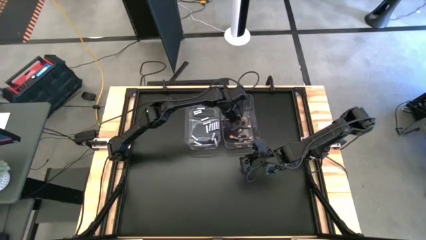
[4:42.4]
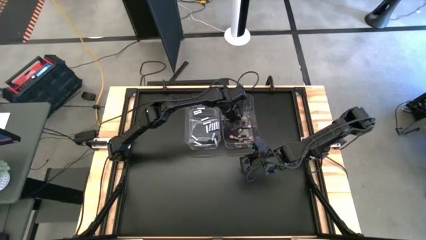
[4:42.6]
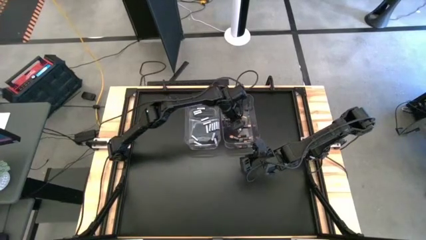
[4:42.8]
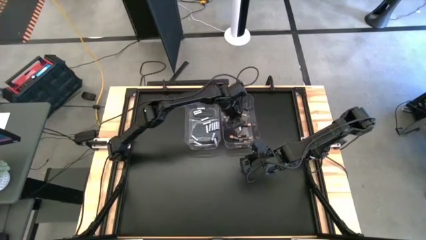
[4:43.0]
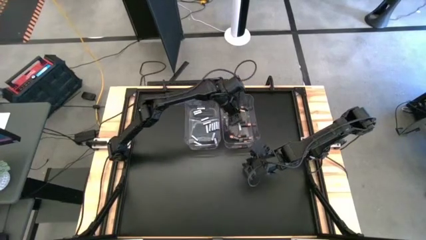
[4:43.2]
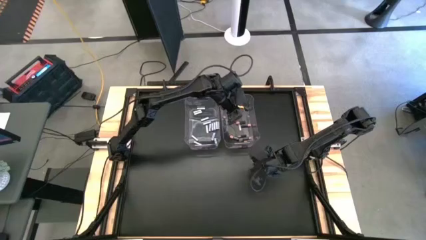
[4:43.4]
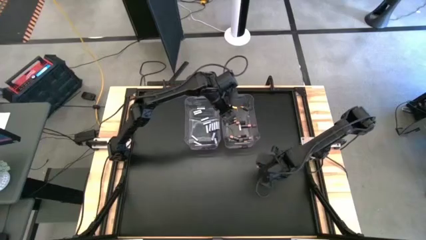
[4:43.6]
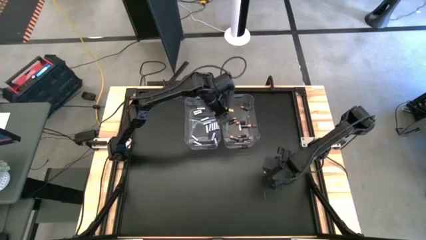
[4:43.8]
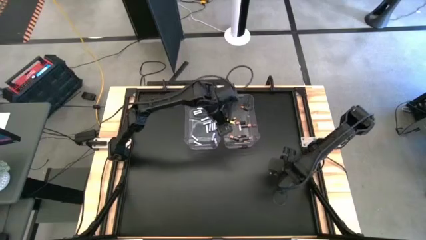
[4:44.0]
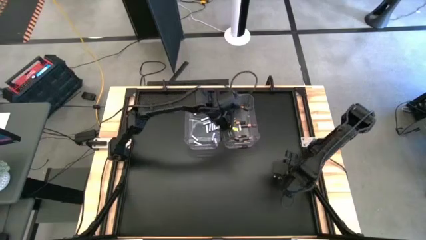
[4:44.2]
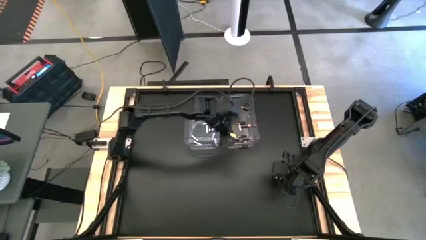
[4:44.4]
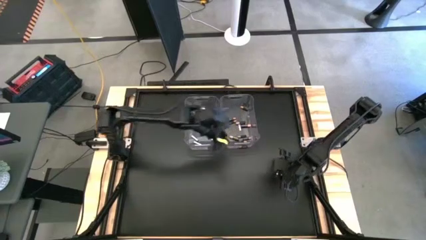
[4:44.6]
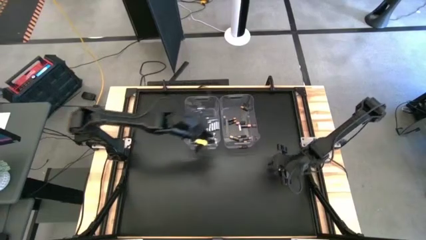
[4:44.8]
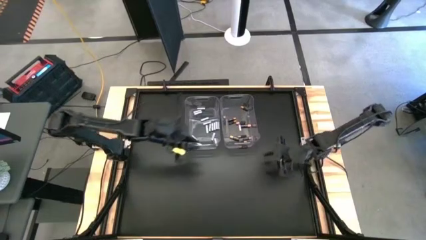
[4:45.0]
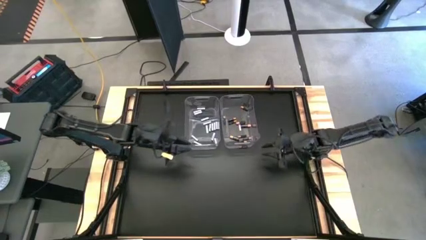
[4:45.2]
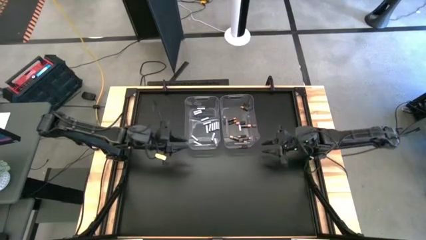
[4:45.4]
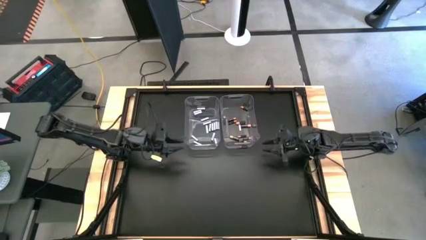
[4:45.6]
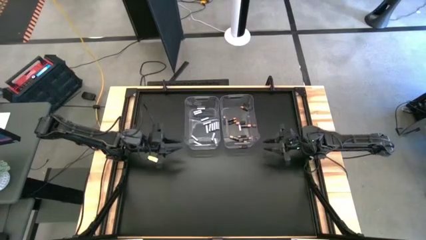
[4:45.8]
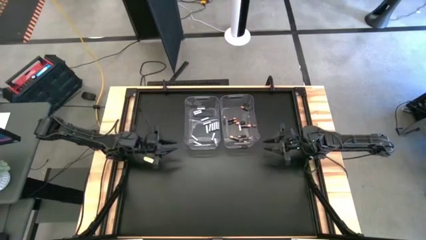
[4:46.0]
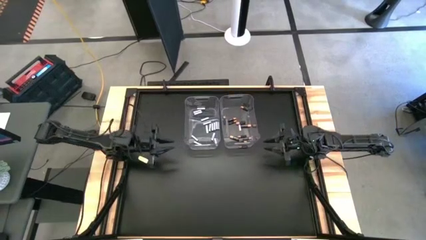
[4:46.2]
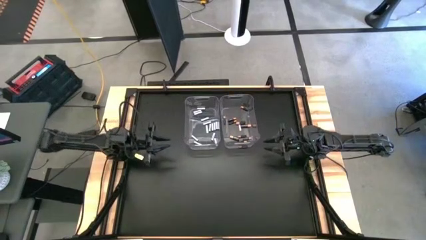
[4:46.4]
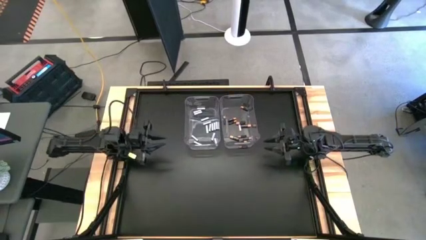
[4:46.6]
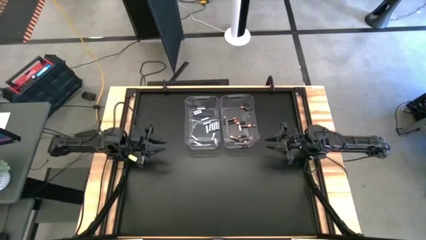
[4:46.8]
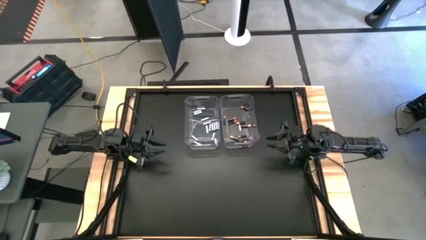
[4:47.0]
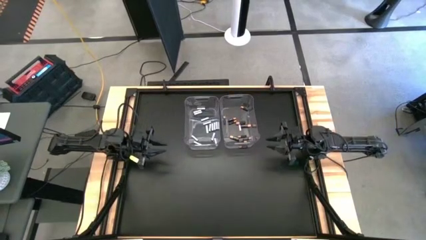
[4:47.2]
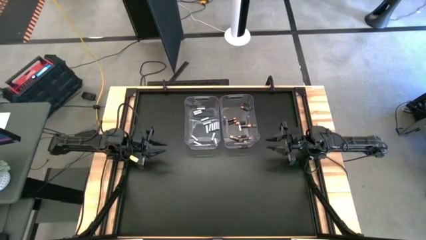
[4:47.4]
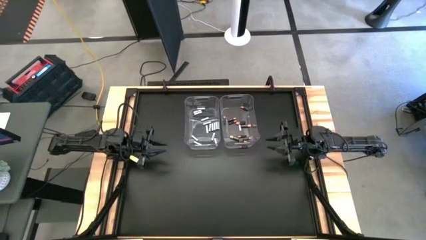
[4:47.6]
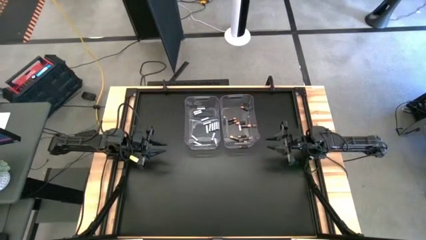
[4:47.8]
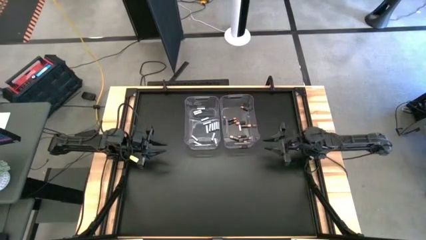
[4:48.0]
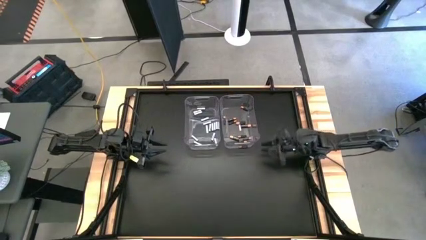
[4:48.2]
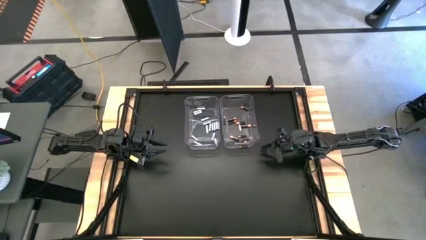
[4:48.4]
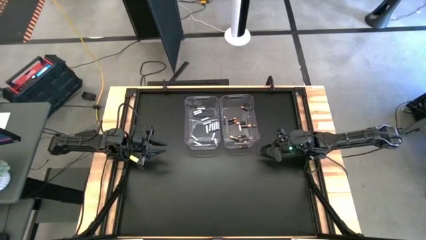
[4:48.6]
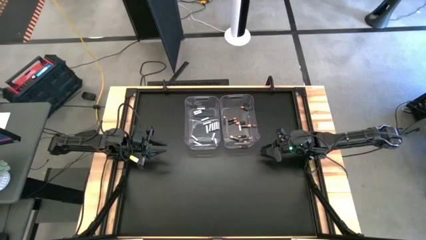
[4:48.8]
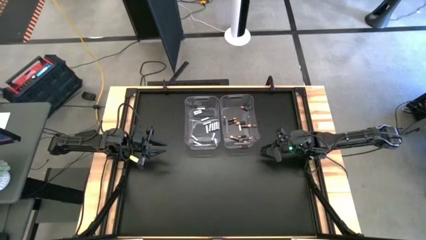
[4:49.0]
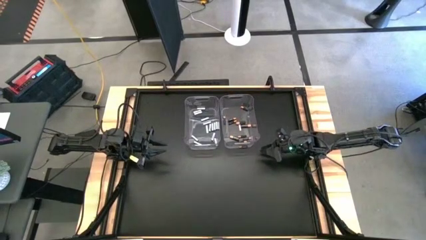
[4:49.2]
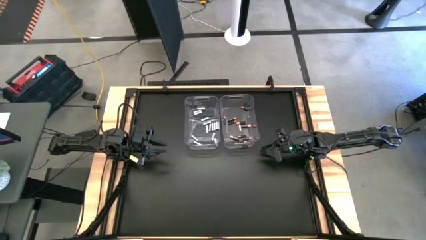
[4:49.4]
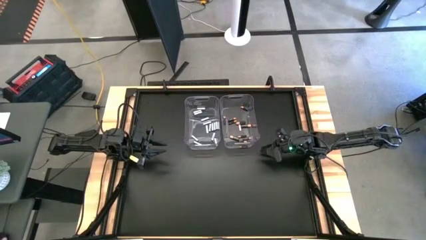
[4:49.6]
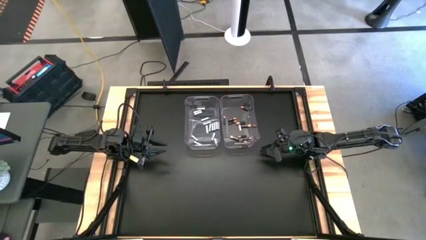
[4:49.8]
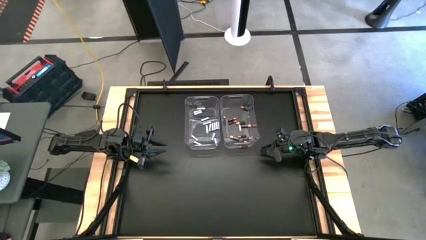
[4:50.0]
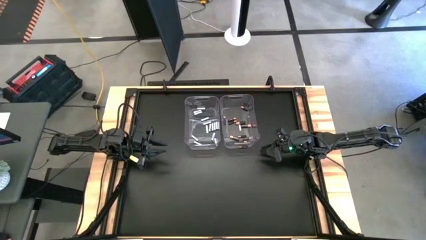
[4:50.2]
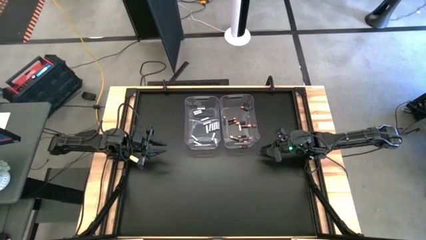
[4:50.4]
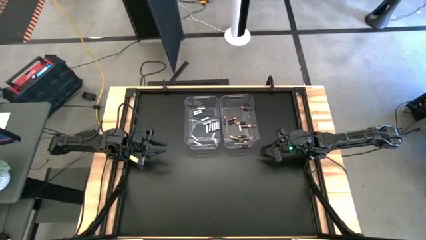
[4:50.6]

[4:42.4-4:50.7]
Task: Sort batteries
Return to Home Position

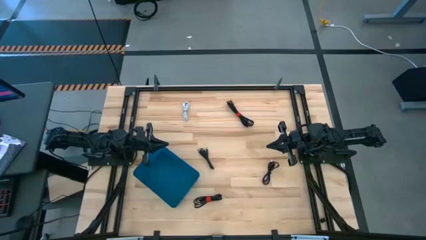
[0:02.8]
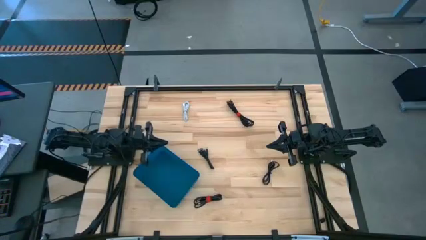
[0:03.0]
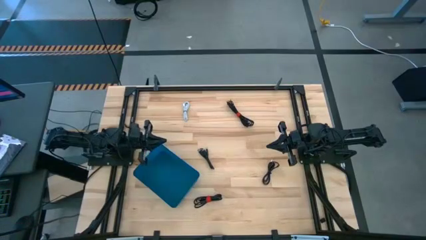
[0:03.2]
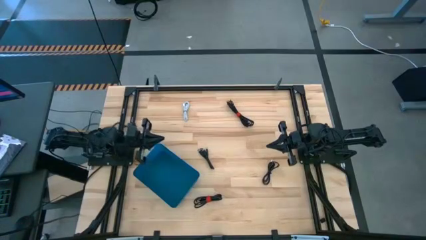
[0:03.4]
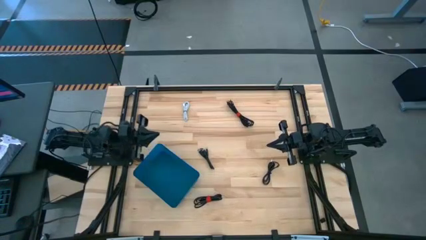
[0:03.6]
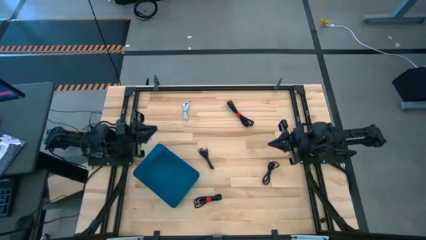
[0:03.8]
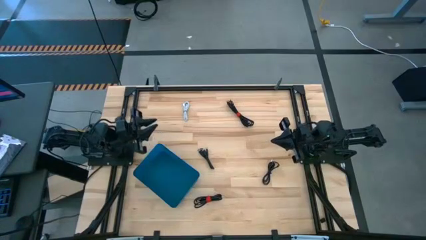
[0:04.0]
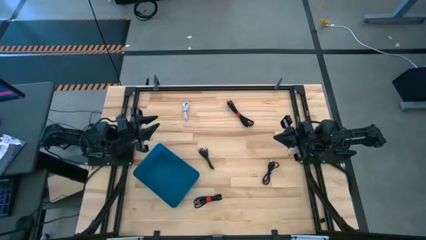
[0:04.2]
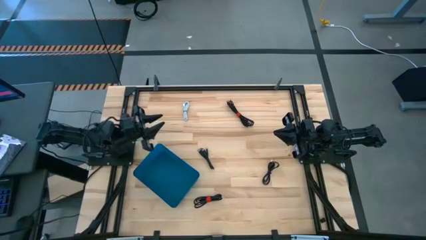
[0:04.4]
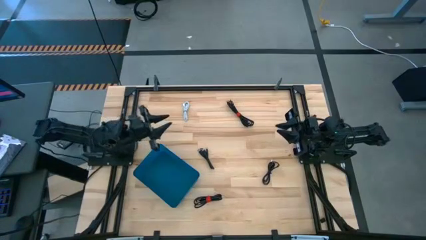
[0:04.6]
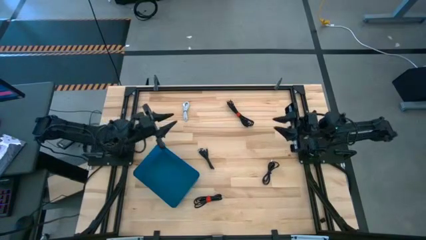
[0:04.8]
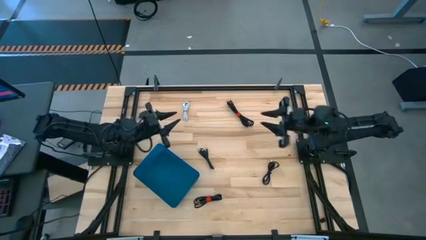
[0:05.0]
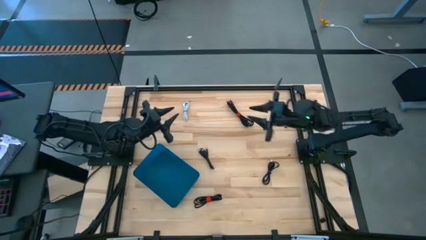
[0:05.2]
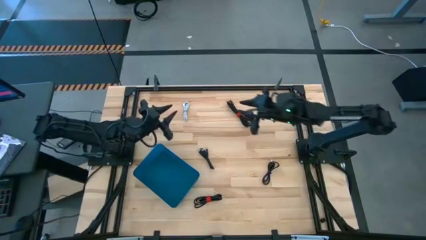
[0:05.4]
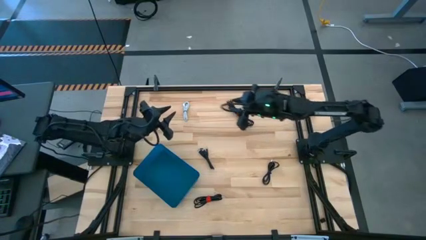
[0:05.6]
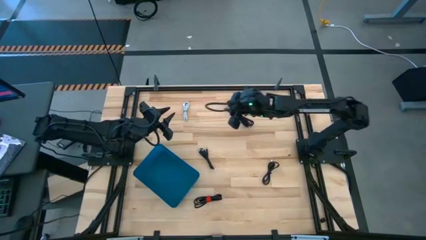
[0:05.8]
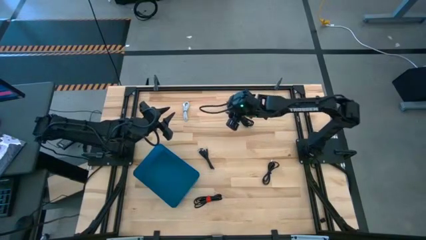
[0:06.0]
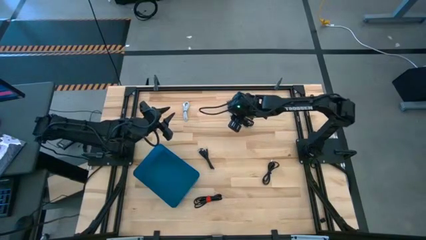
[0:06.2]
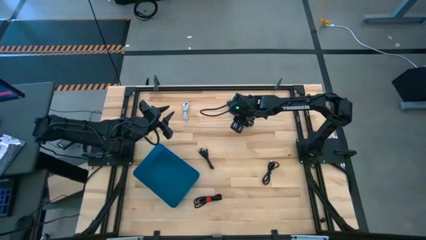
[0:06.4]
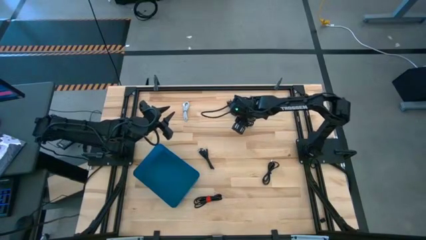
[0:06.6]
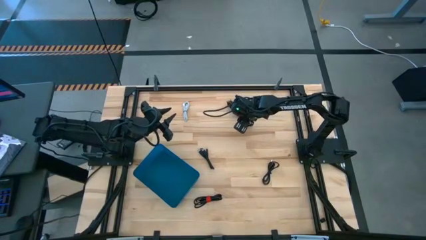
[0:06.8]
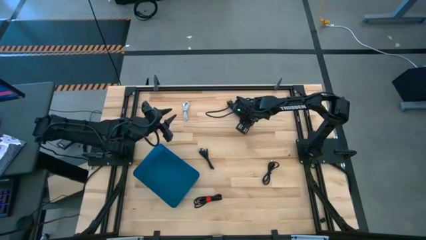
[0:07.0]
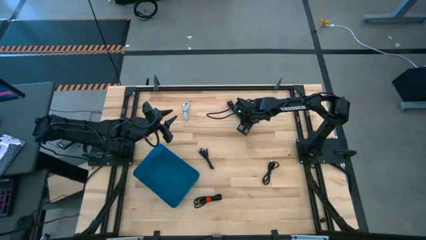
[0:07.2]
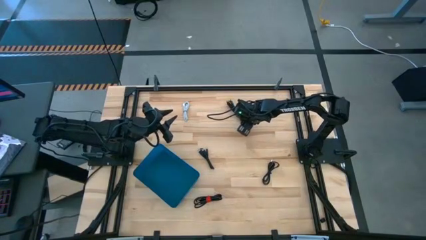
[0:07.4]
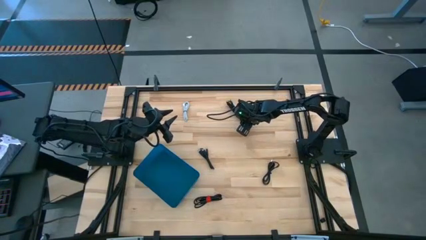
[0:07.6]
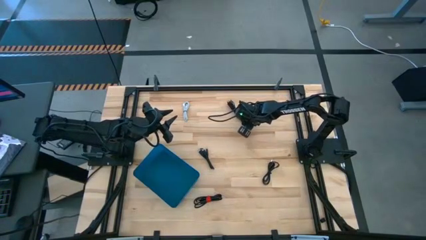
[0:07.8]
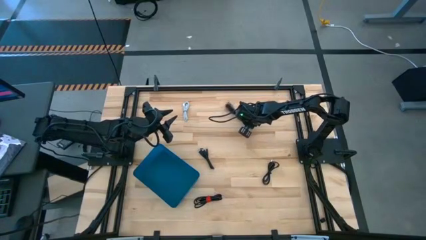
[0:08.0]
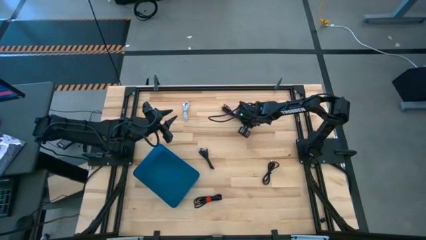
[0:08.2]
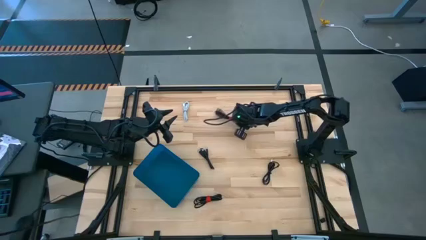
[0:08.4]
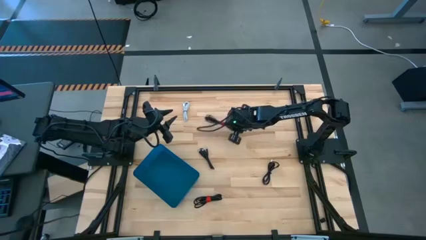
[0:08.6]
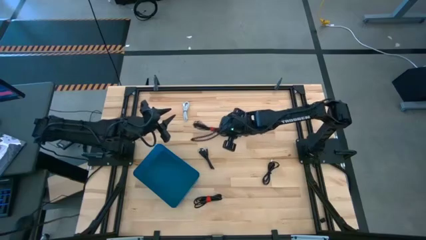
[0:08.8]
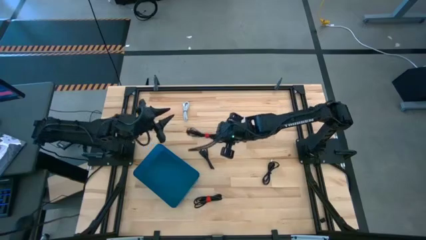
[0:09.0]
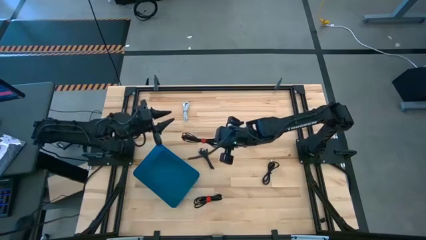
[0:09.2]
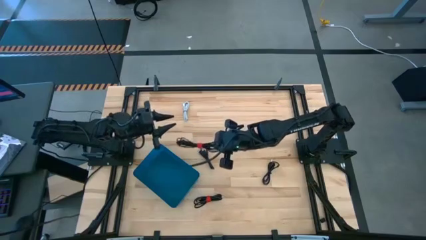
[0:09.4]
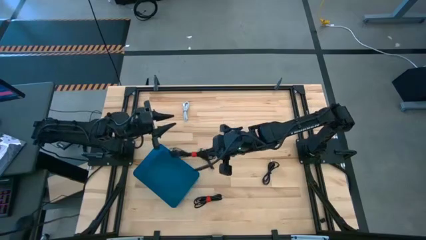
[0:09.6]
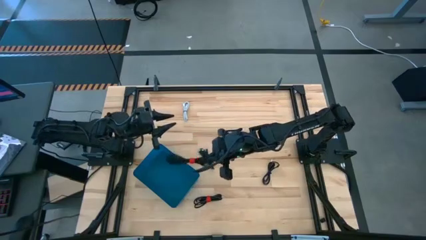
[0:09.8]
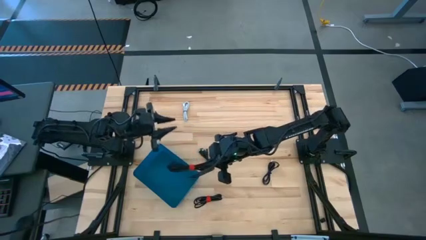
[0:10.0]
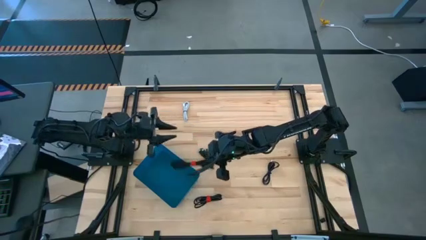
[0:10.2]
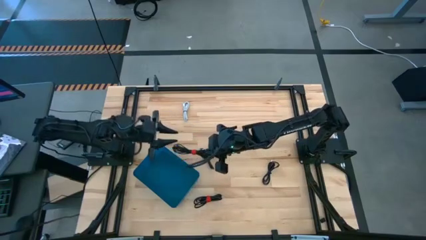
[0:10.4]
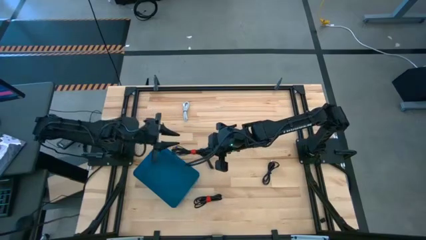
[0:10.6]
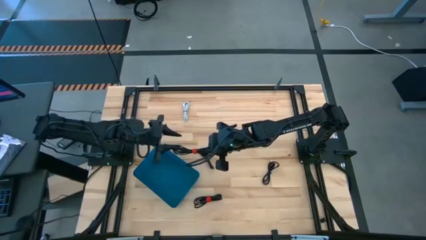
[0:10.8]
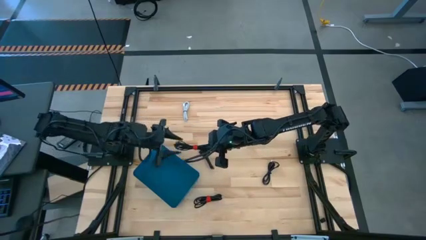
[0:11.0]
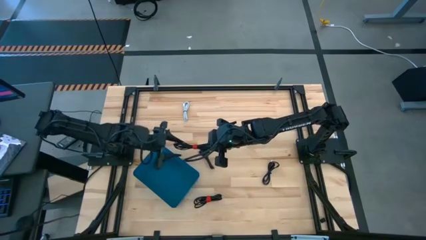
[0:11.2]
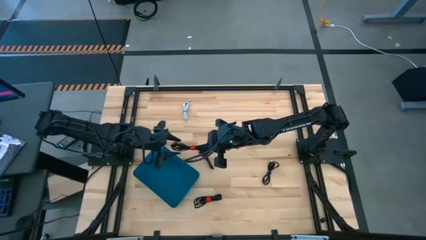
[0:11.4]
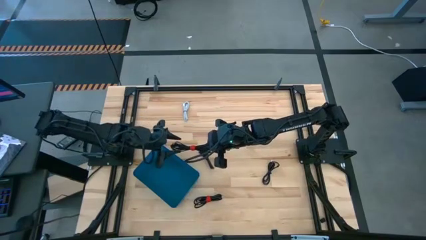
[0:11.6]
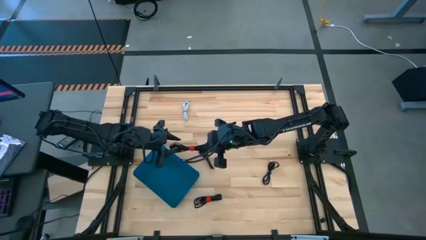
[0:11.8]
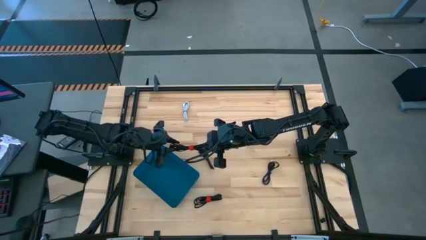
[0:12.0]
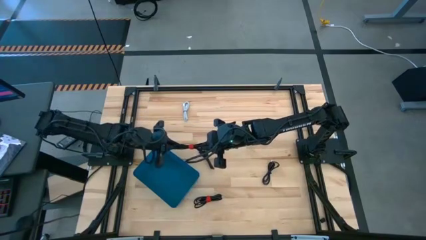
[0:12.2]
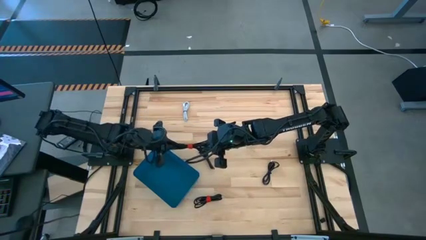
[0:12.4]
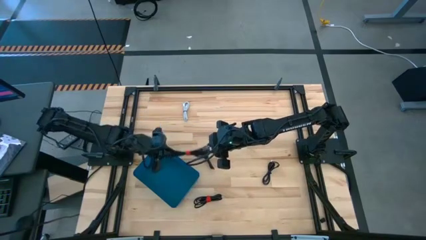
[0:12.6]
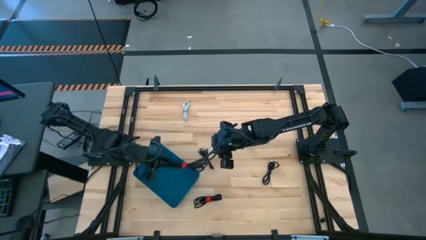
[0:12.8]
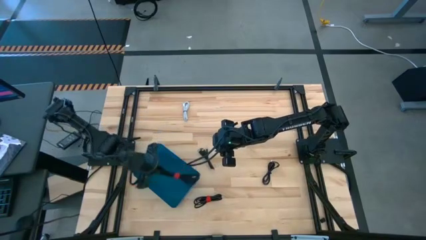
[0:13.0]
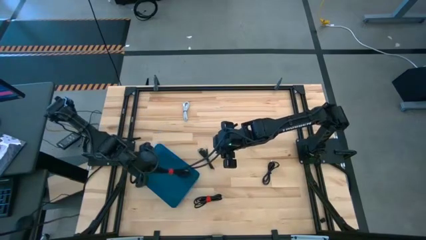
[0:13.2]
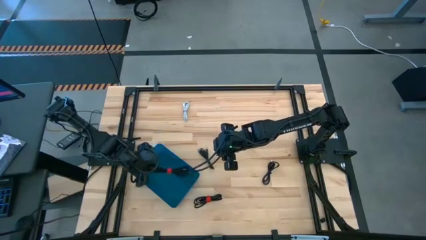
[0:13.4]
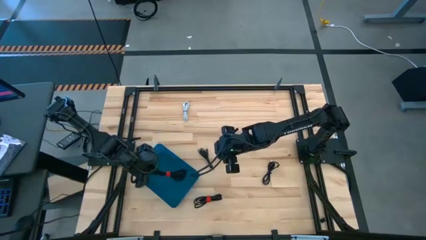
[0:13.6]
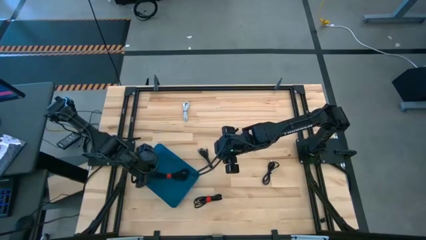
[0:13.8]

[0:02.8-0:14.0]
Task: Pick and place USB-C Cables
Put the black charger cable into the blue bin
